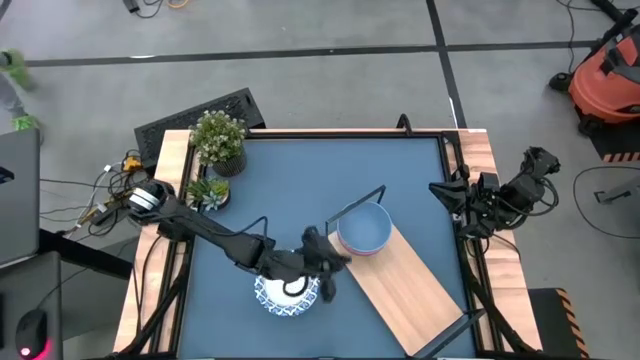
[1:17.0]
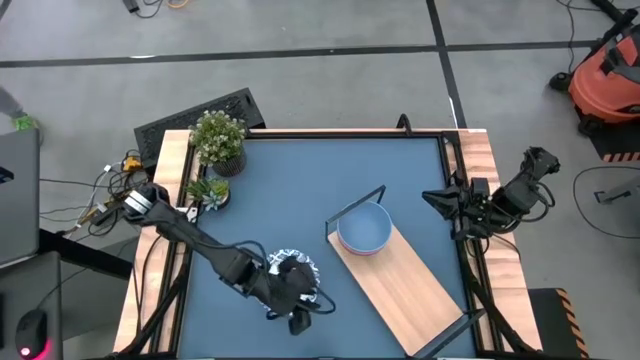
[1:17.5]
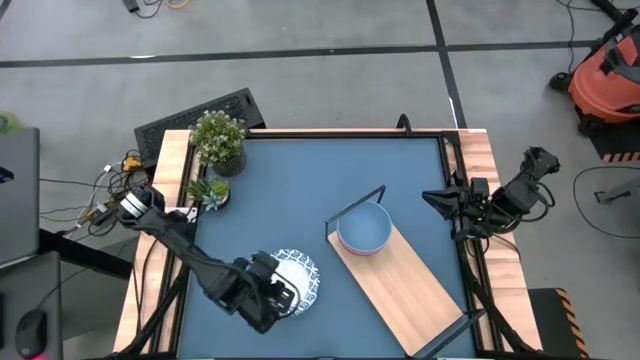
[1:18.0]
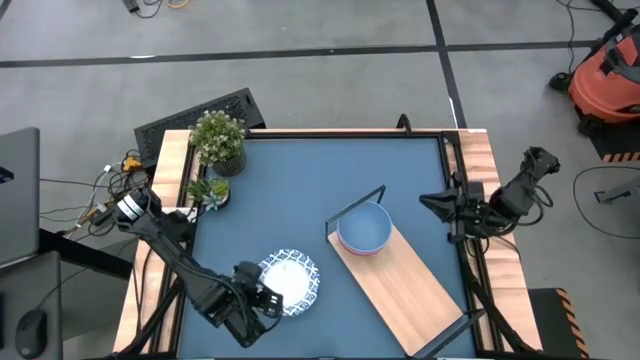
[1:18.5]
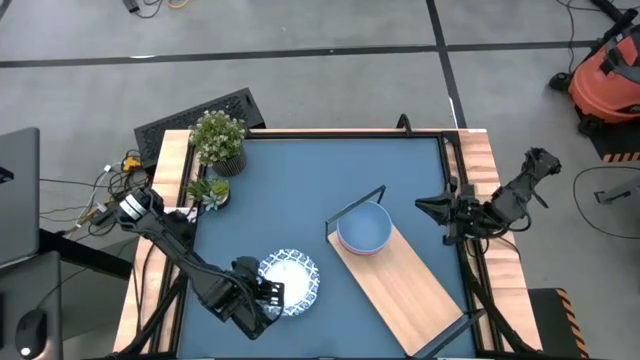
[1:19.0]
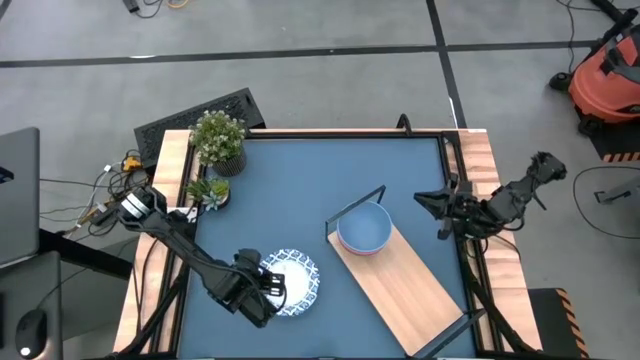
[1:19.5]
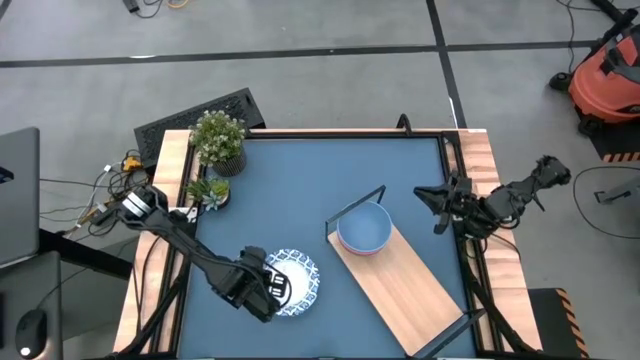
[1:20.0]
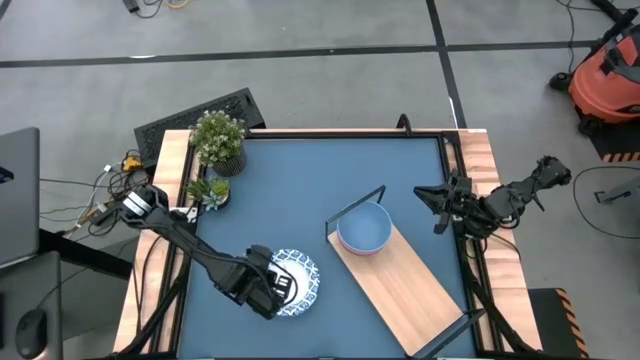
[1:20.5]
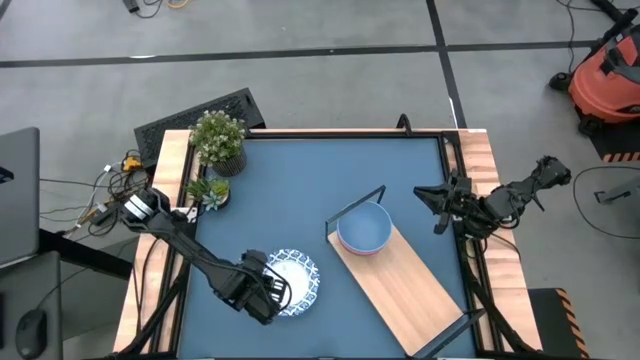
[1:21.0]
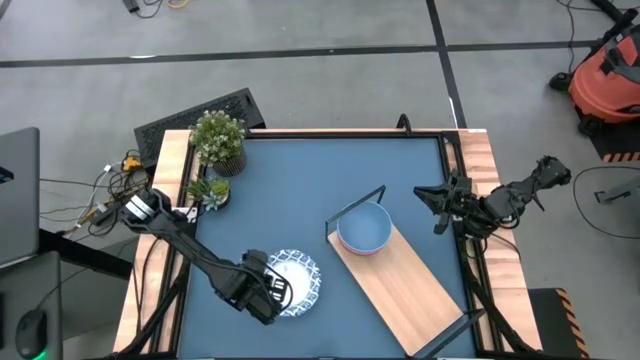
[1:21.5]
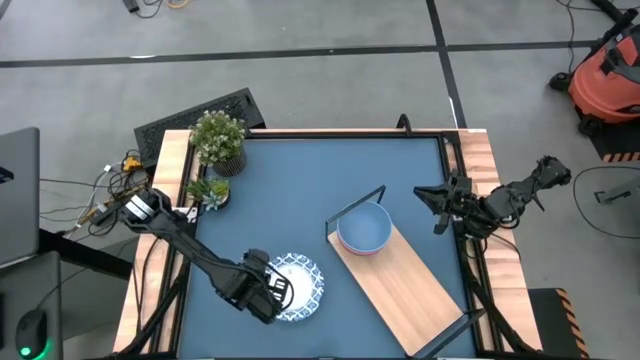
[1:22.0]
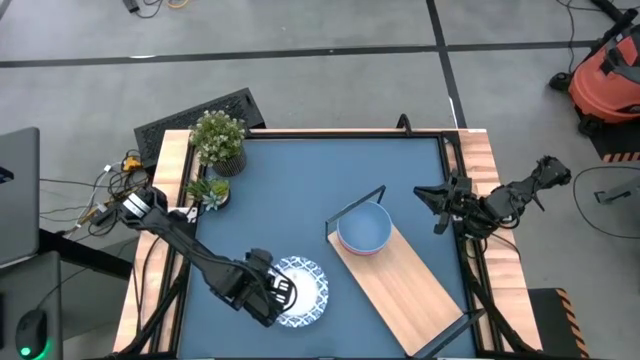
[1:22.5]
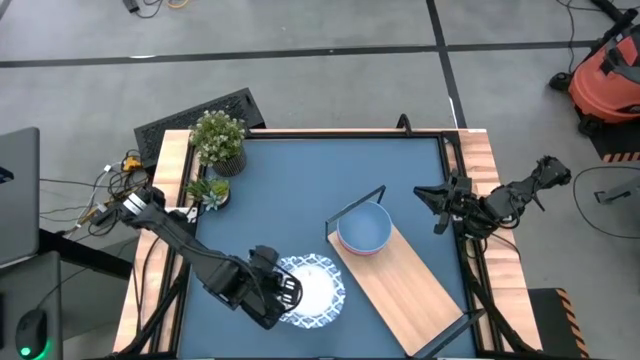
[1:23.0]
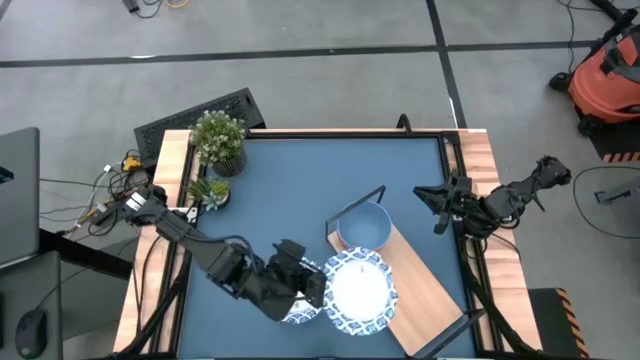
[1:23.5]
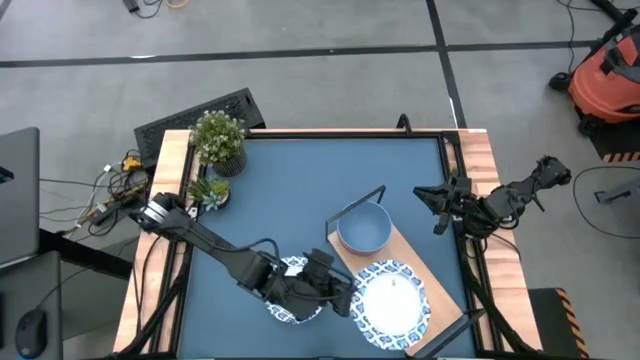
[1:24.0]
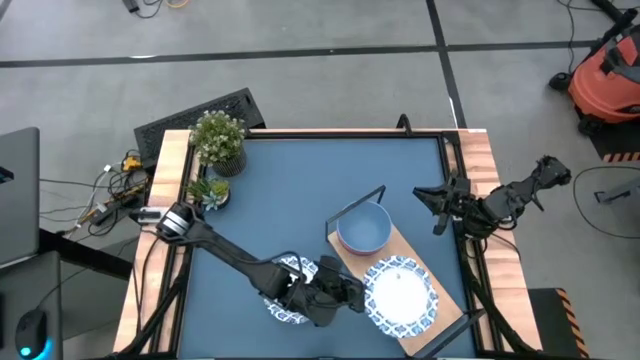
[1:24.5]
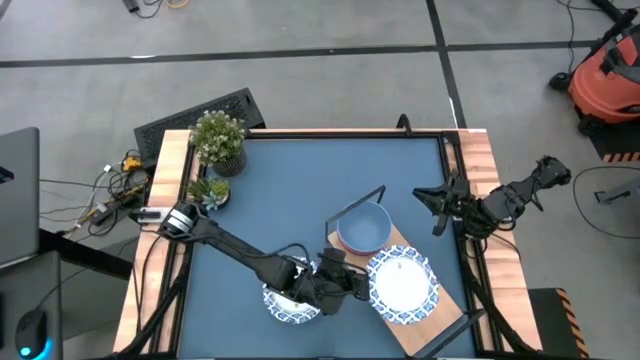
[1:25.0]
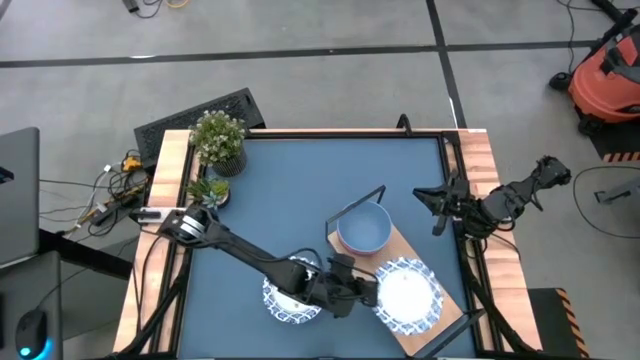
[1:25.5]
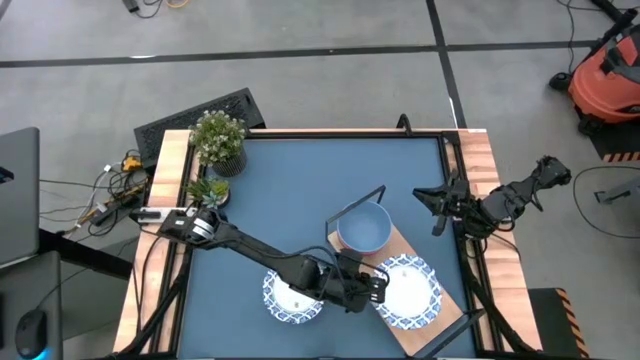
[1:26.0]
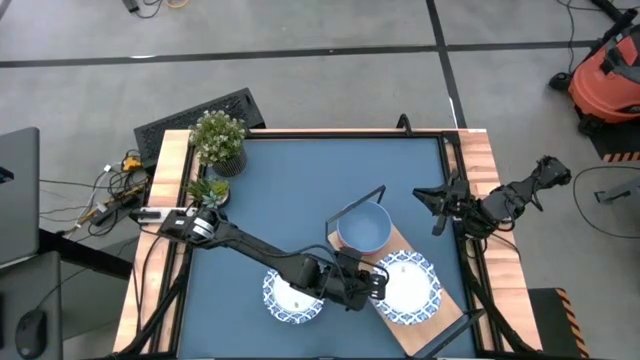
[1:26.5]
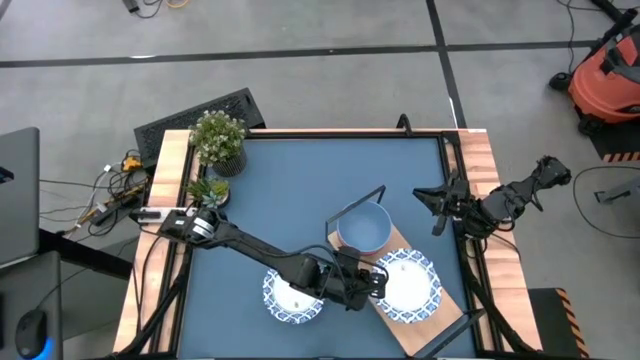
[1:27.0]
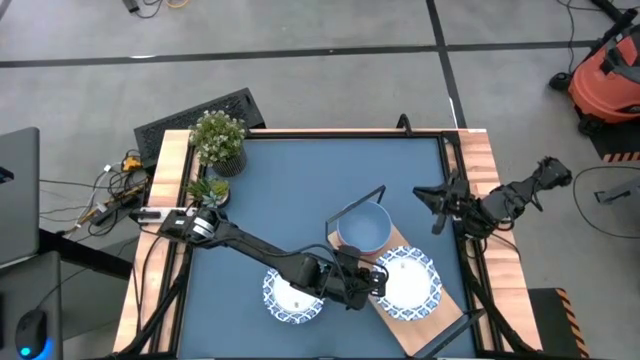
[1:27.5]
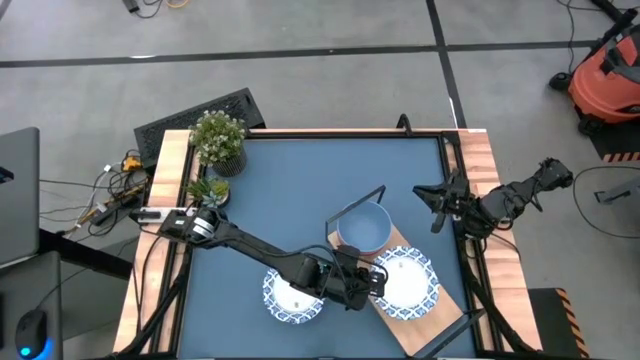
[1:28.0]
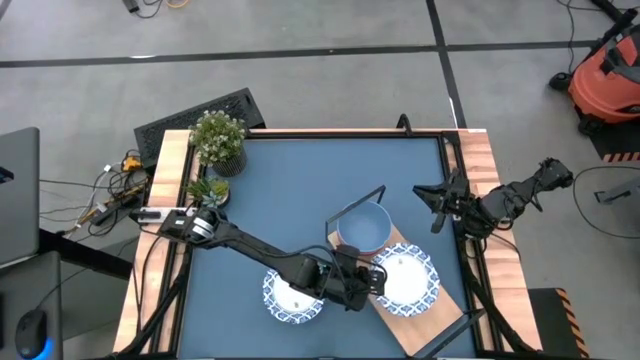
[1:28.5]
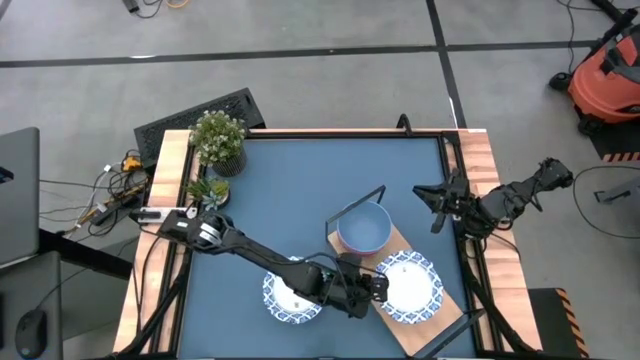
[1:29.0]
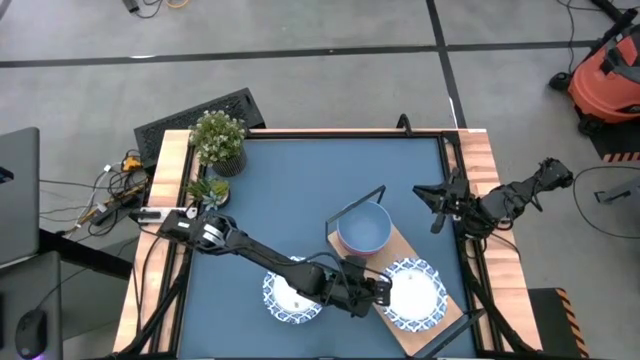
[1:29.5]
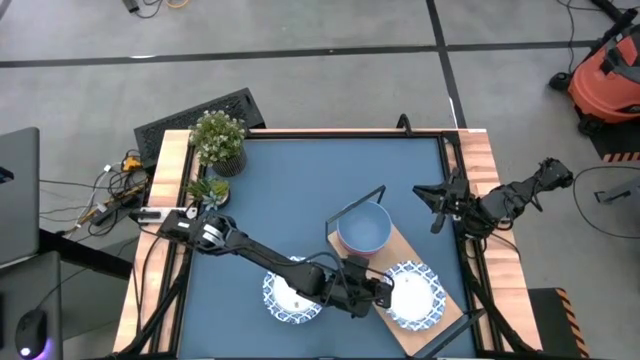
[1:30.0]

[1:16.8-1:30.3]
Task: Place and stack bowls onto a shelf
Put the white bowl on the shelf

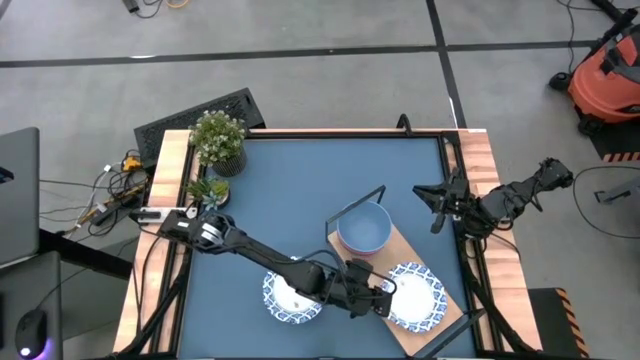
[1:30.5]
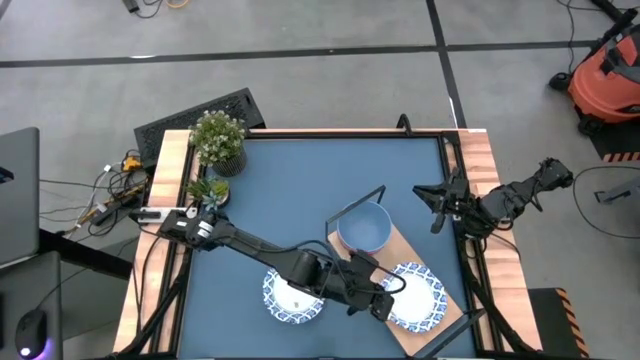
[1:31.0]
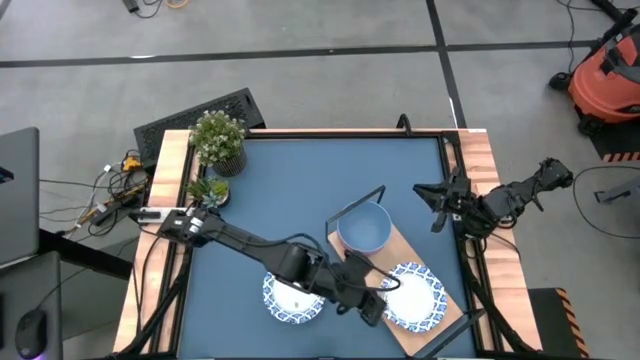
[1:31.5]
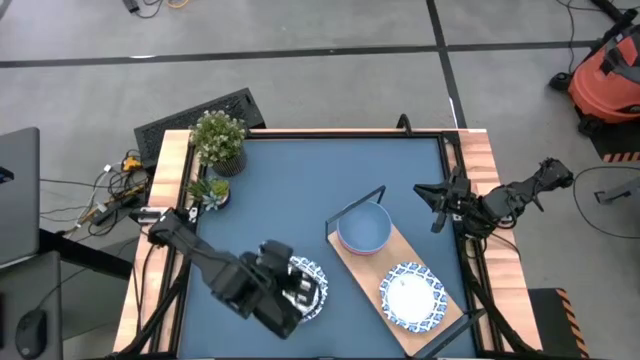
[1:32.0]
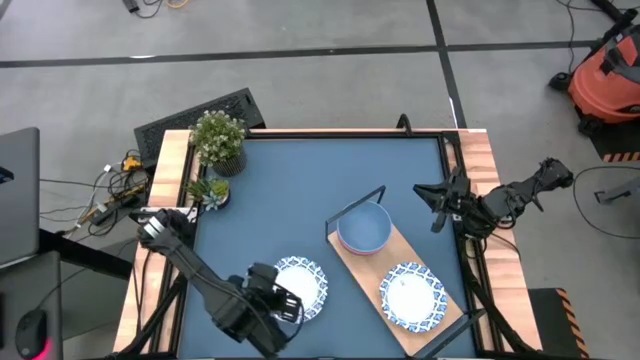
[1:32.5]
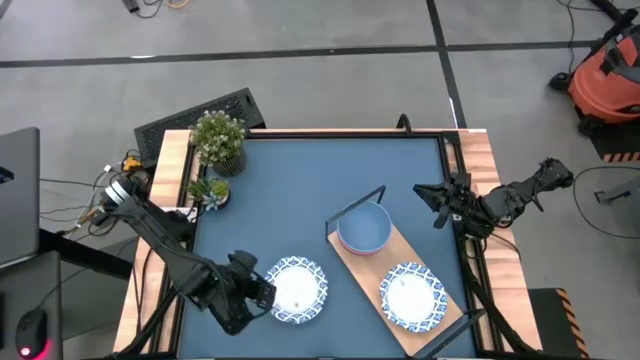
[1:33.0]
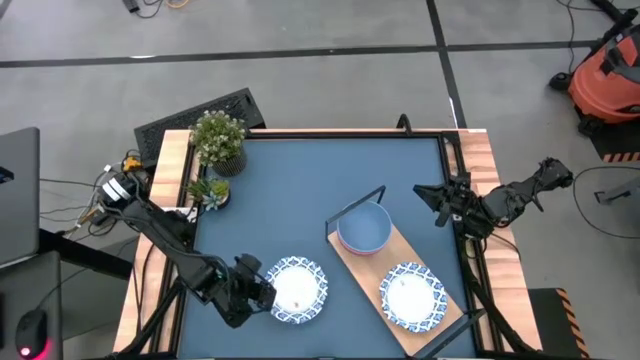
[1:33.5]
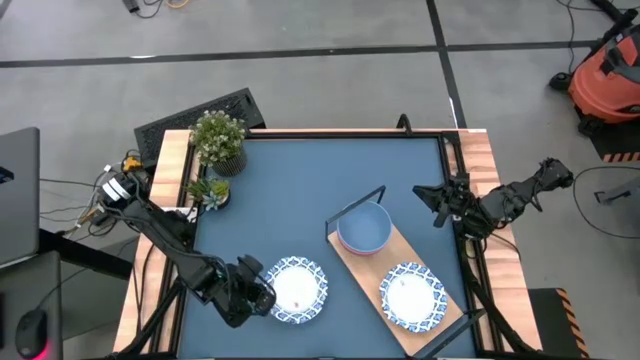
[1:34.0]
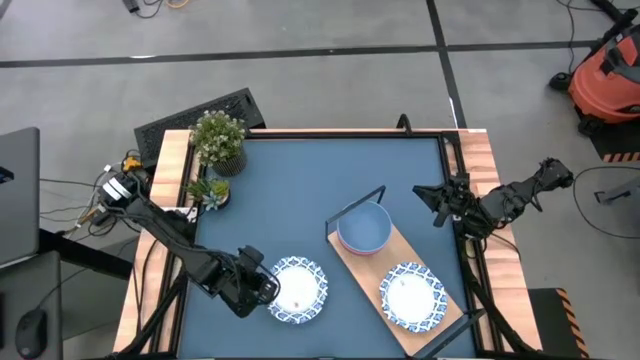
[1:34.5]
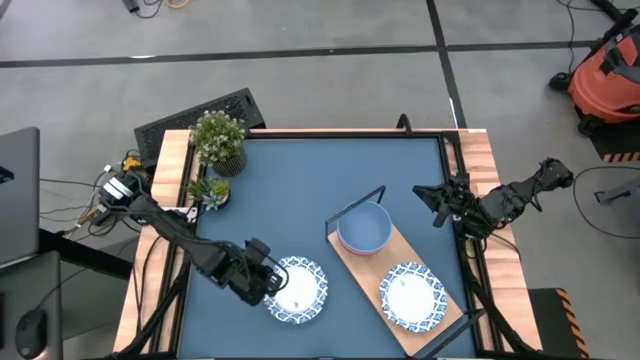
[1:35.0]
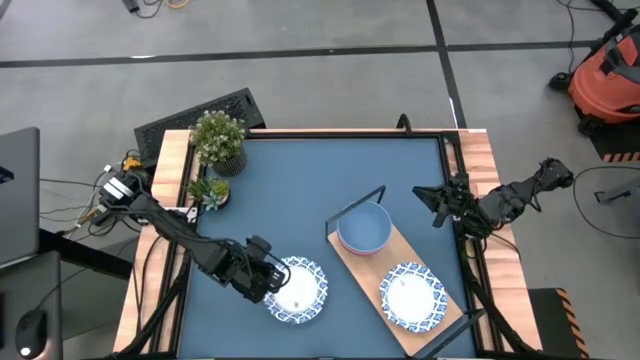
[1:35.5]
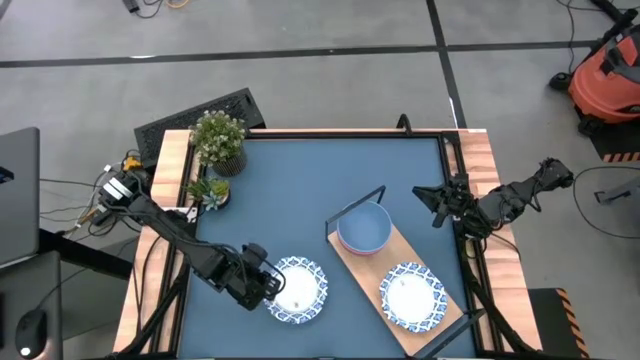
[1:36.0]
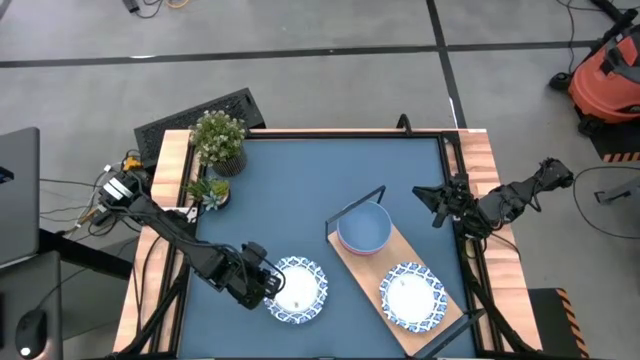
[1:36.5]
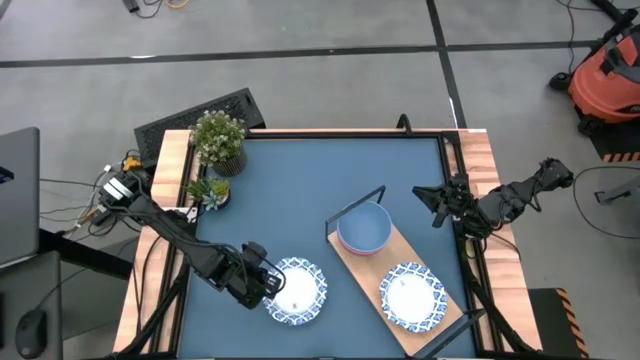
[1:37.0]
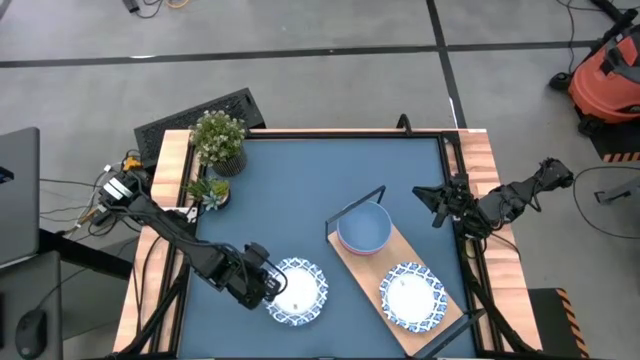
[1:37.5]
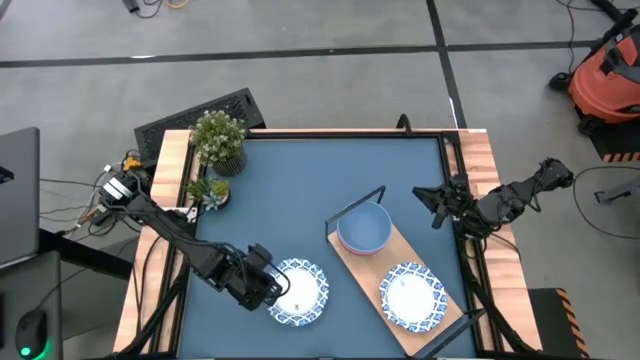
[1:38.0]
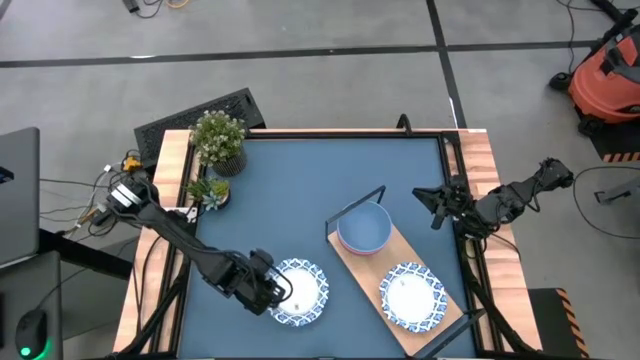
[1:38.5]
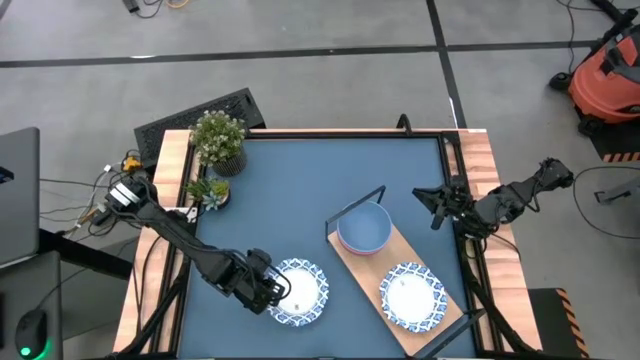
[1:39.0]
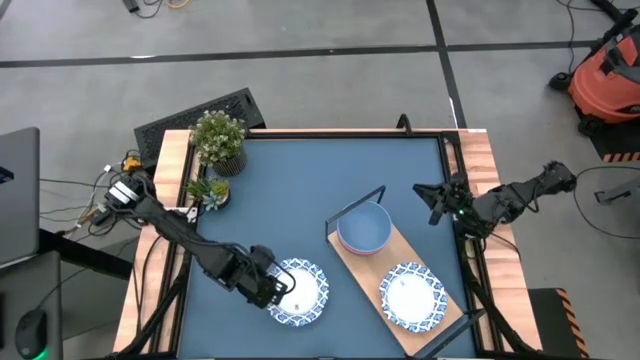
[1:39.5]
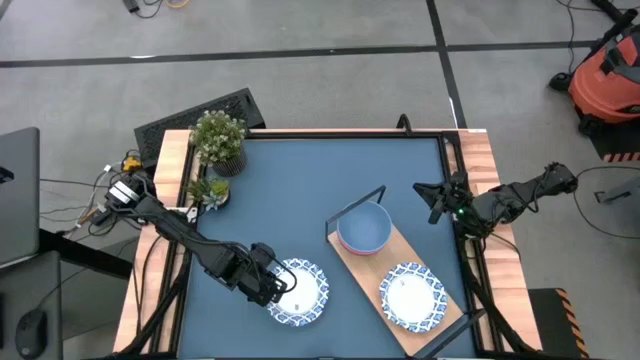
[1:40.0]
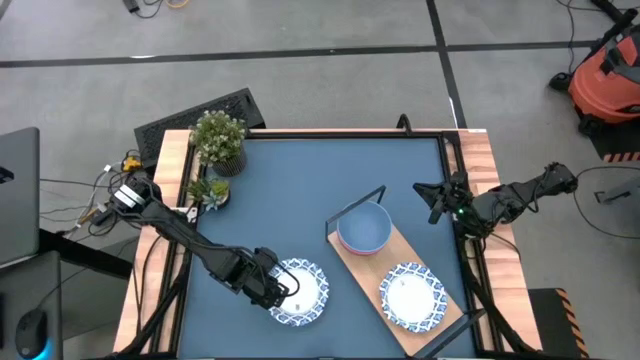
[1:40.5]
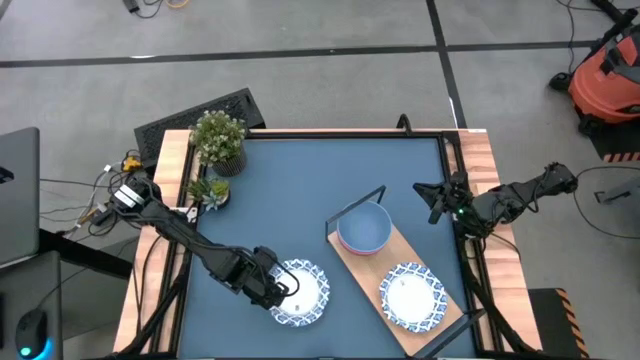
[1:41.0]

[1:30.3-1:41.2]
Stack the white bowl on top of the white bowl on the shelf
